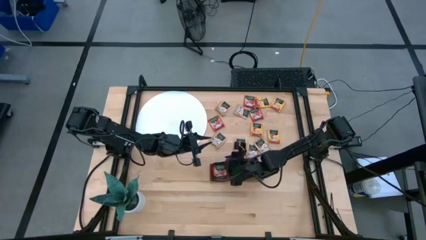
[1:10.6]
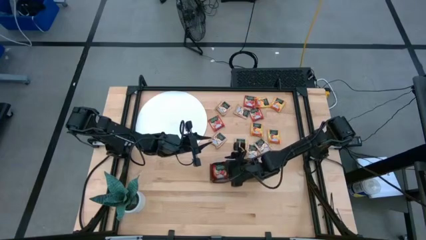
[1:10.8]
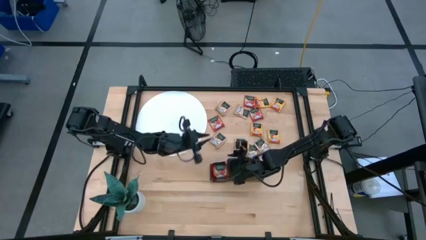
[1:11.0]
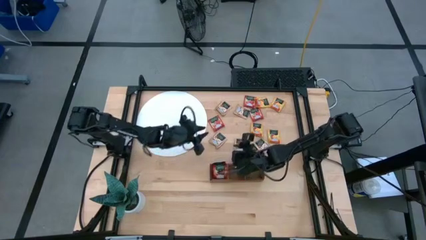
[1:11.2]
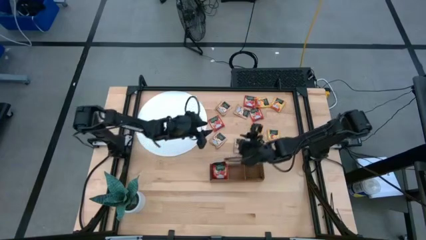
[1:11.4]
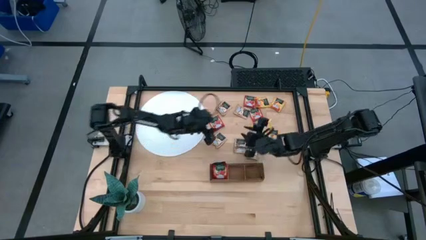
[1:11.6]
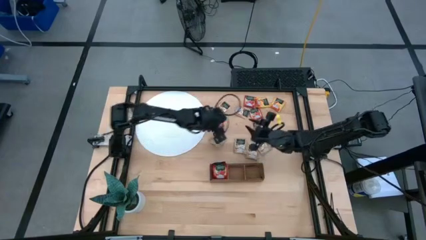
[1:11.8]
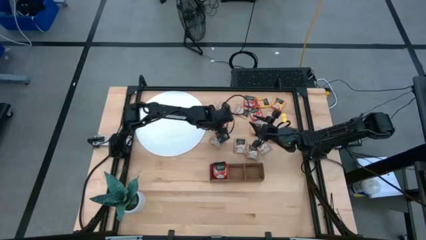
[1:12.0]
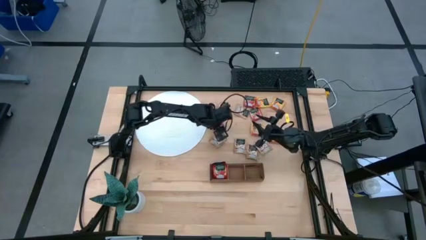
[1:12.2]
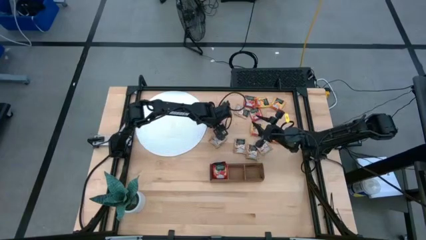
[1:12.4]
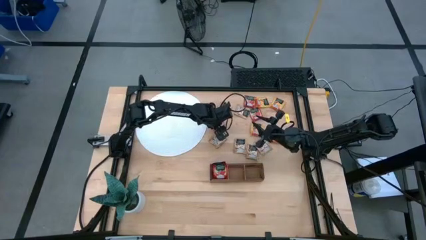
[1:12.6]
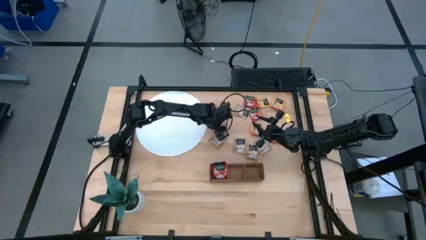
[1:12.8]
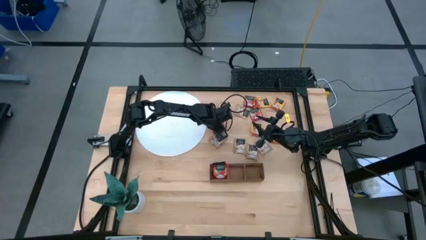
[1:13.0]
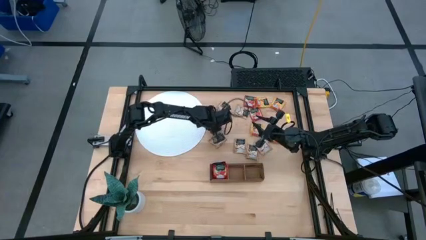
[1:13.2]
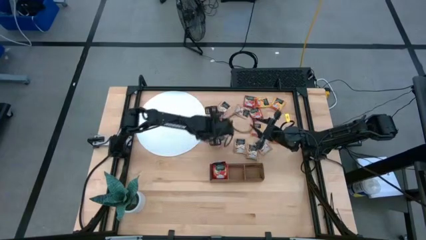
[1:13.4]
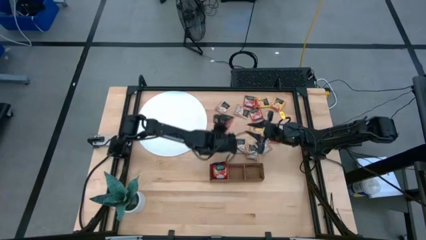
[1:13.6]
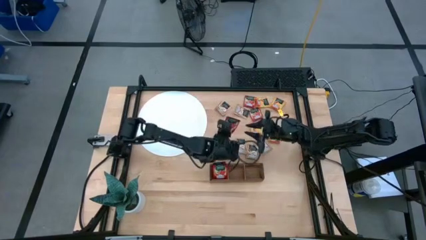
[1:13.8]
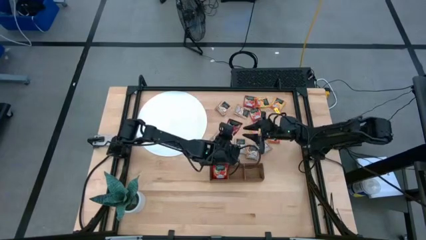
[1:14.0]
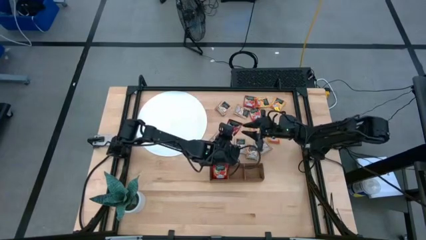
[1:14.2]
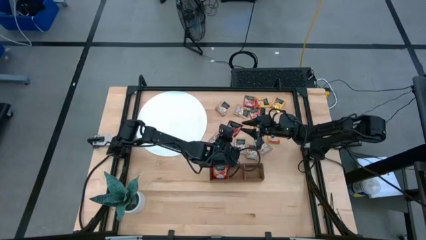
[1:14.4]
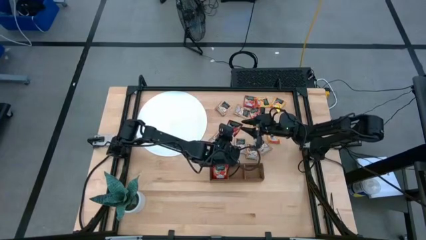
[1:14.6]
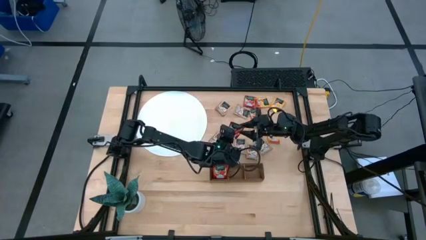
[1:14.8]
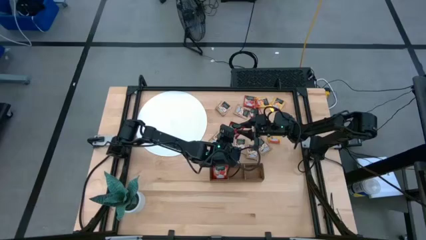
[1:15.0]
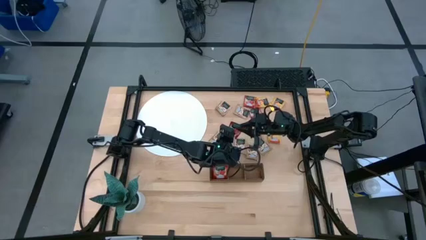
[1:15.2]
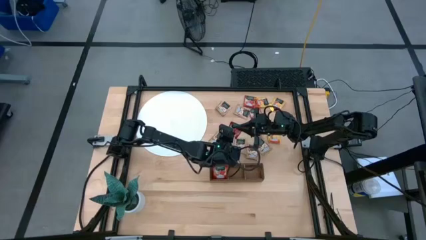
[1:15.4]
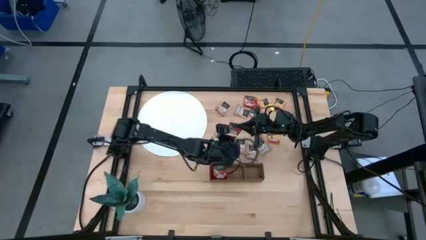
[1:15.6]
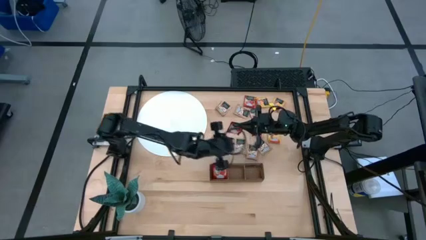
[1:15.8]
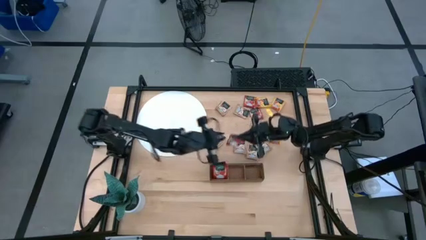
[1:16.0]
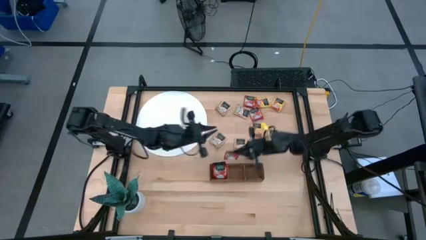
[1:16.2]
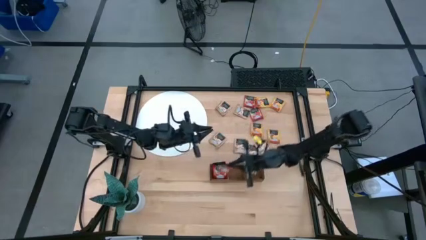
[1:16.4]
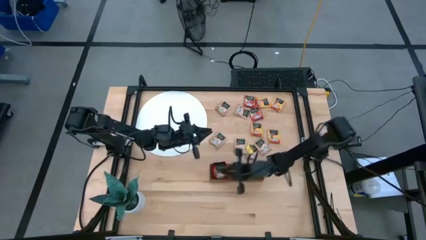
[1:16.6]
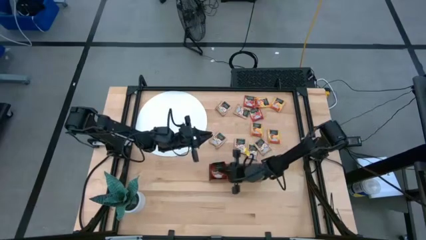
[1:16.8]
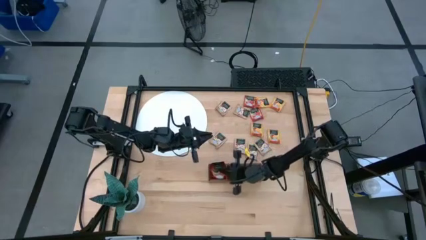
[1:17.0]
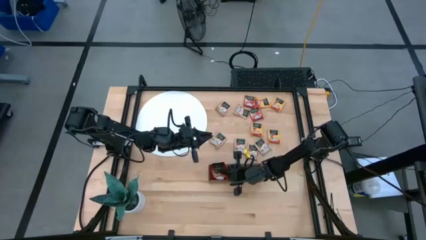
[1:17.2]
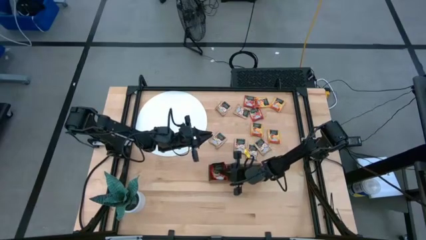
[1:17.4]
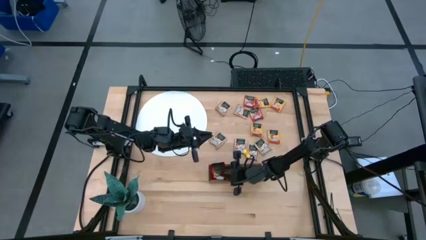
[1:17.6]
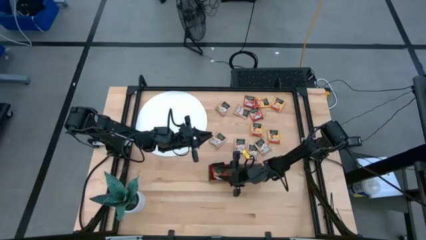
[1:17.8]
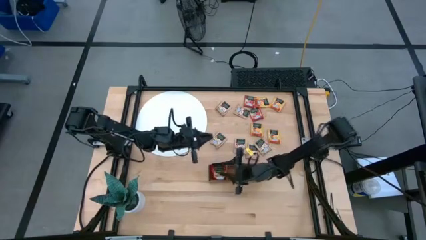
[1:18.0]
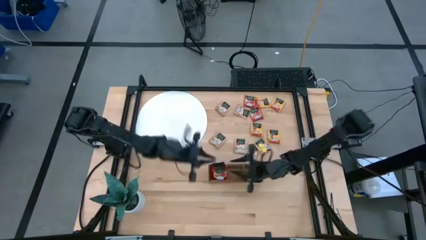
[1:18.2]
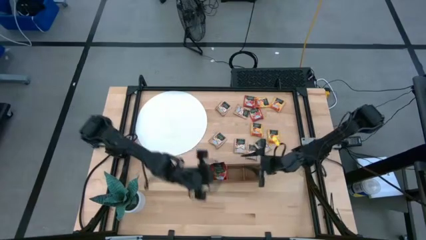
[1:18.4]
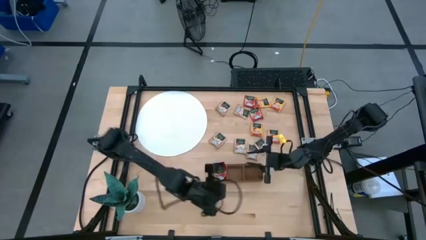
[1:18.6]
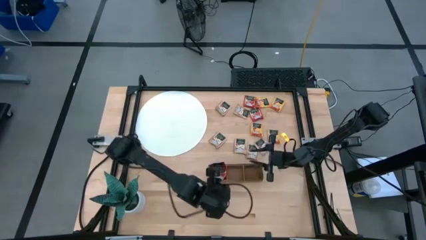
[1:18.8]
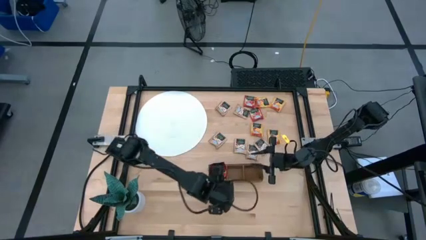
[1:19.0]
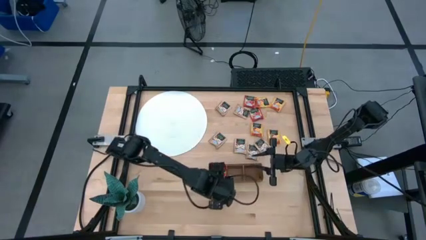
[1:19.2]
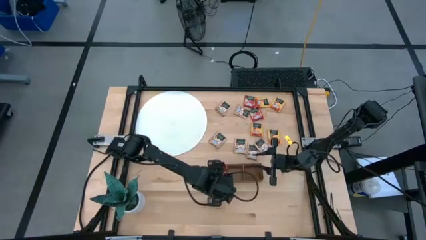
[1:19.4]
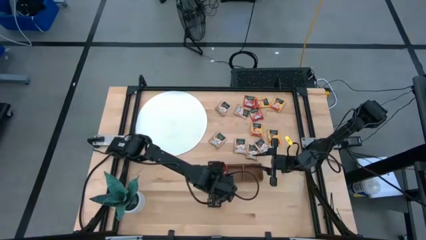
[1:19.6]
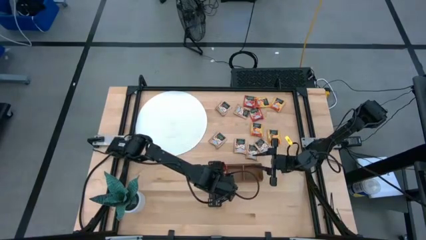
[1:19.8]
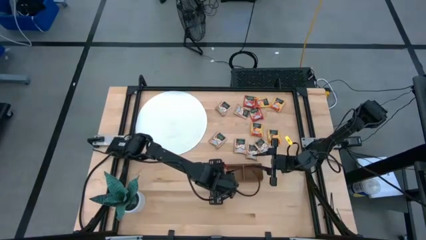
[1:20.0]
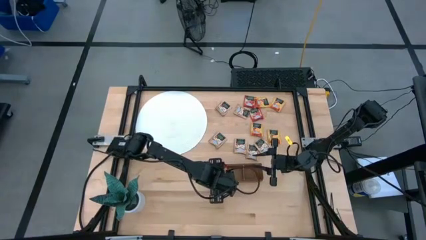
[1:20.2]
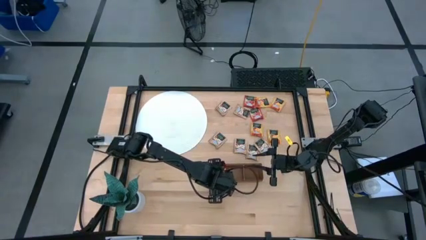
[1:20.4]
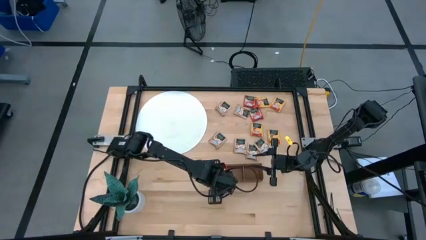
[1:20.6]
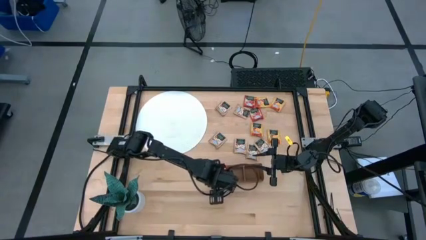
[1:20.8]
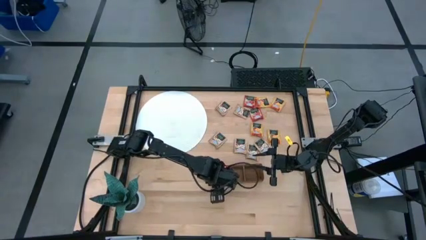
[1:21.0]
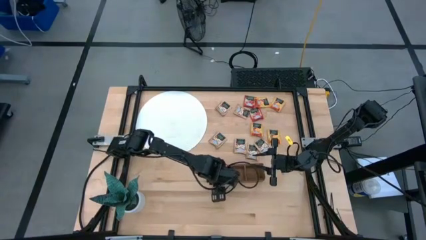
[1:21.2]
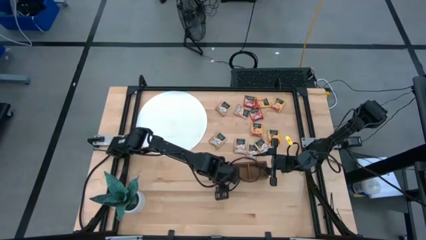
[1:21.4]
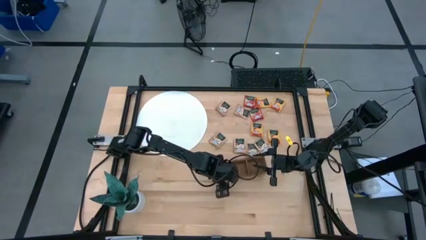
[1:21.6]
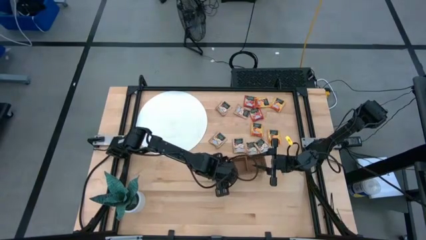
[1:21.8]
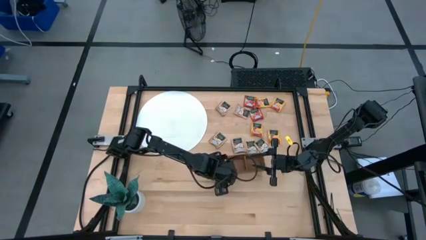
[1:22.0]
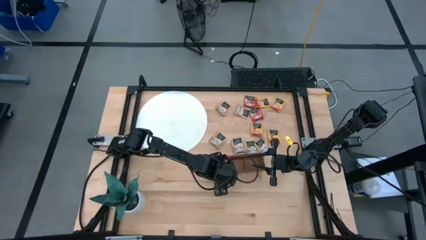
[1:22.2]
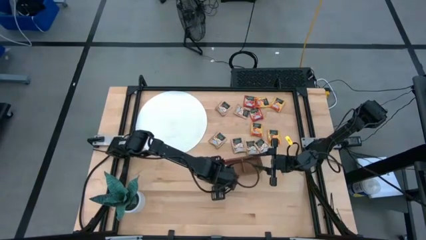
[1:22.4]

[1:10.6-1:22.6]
Task: Pick & Place Tea
Put the red tea bag into the left section of the wooden organizer

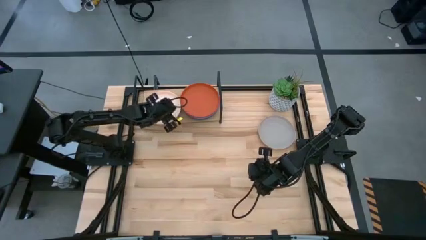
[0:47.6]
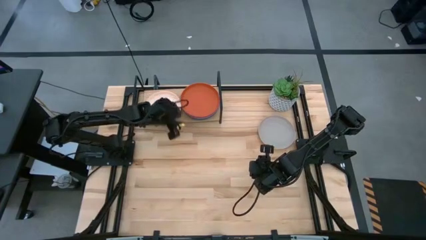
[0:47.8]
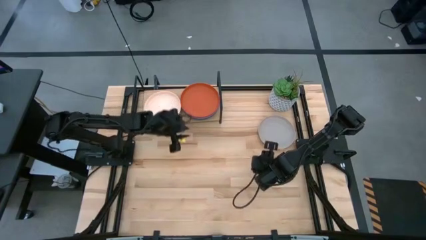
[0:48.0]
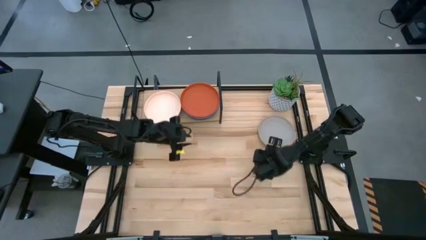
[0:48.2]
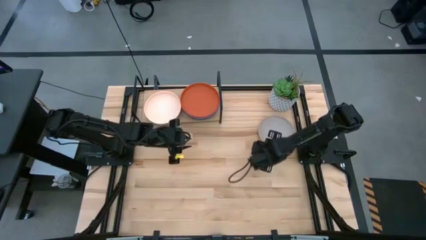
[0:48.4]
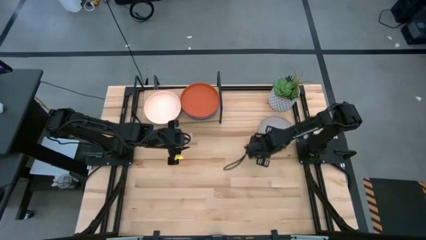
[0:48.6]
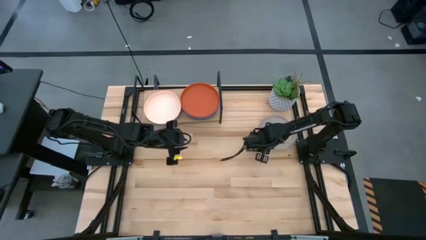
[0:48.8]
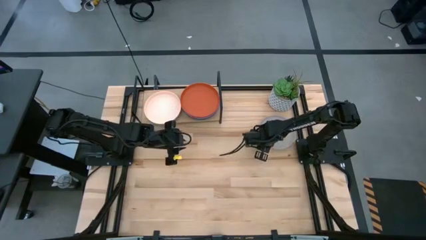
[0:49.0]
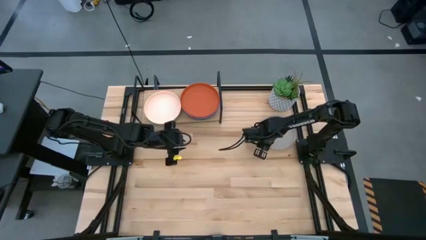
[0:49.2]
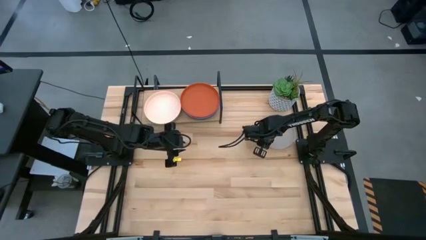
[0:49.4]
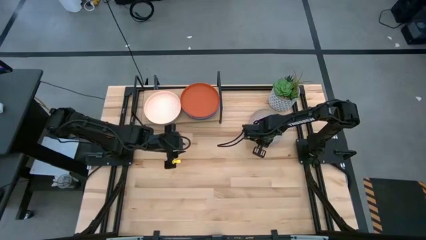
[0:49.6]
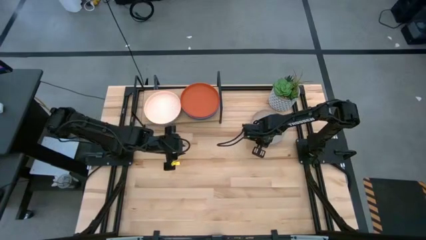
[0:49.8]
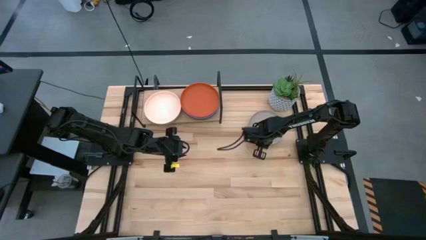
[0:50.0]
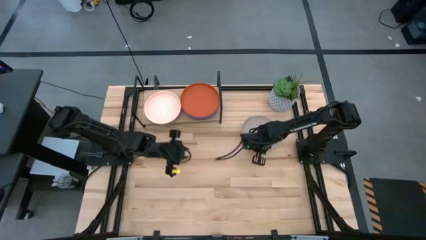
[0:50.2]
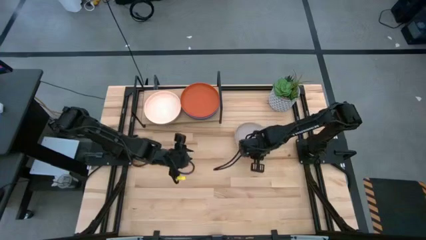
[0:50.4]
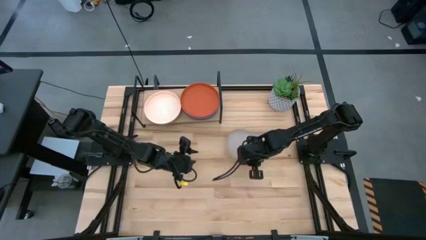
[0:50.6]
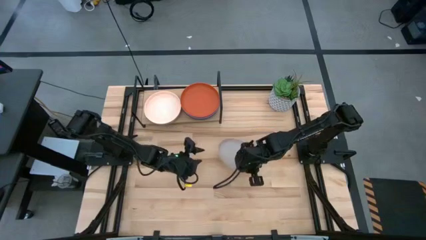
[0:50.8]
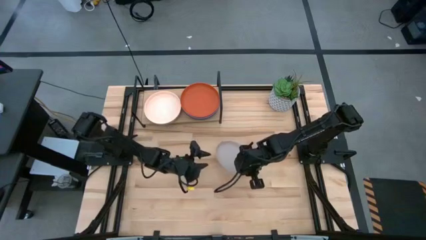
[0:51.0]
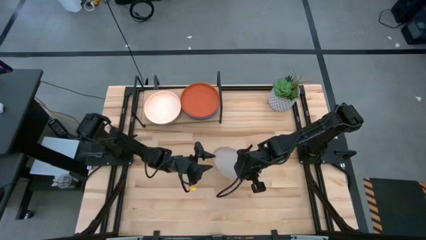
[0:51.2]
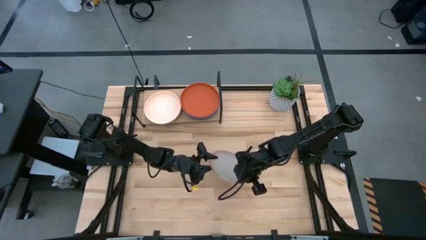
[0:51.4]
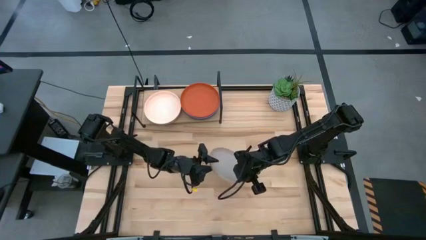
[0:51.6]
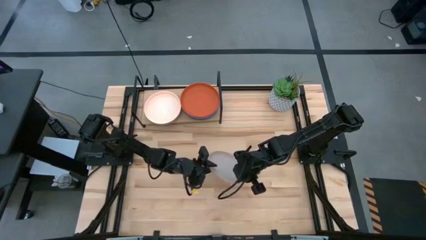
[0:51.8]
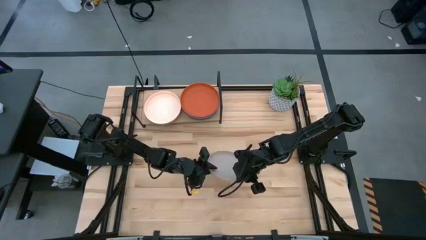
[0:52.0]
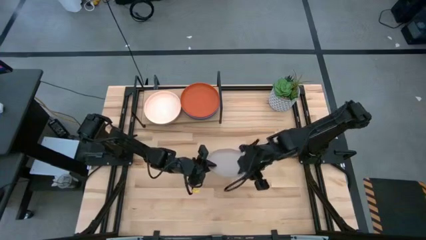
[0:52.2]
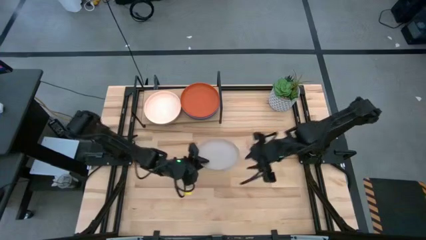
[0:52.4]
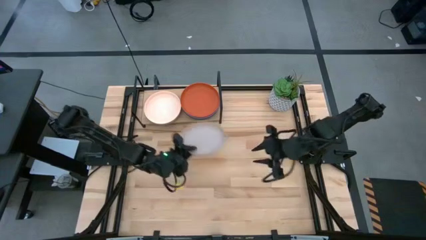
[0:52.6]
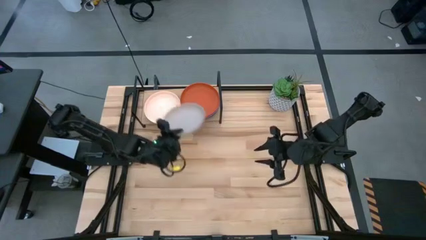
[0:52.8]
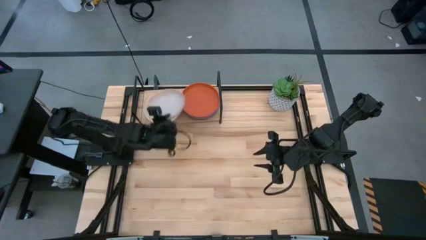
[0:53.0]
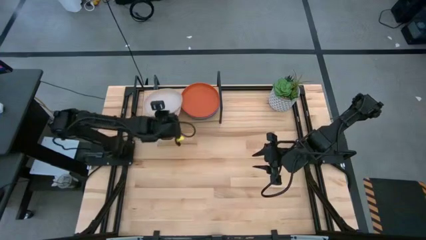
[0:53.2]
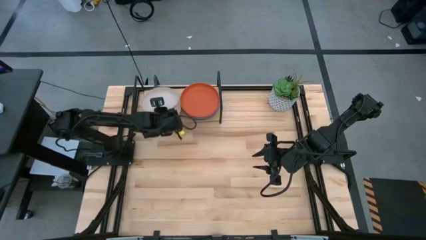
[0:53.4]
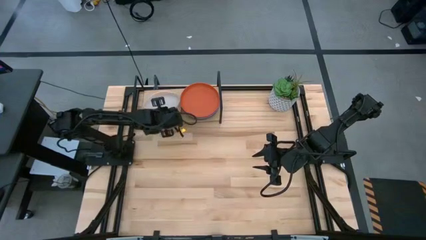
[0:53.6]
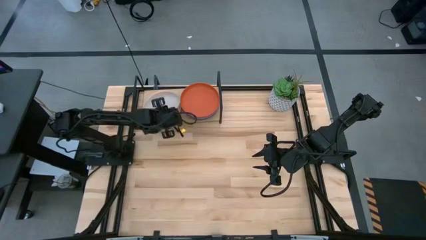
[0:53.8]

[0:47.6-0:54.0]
Task: Place and stack plates onto a shelf
Stack the gray plate on top of the peach plate on the shelf
